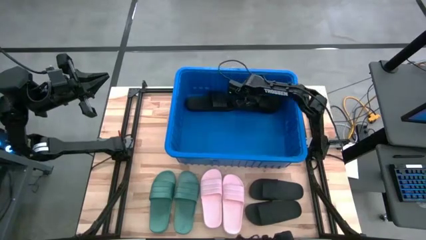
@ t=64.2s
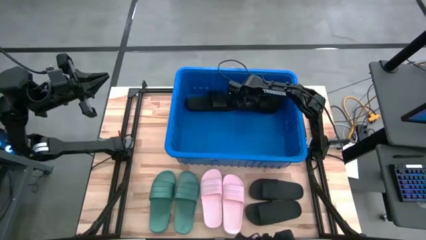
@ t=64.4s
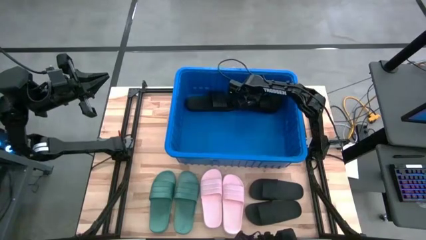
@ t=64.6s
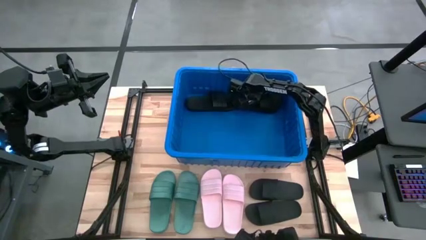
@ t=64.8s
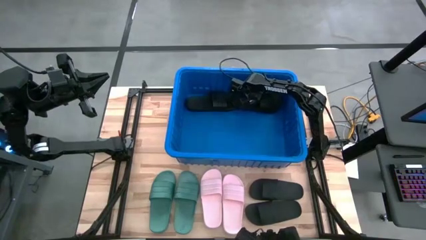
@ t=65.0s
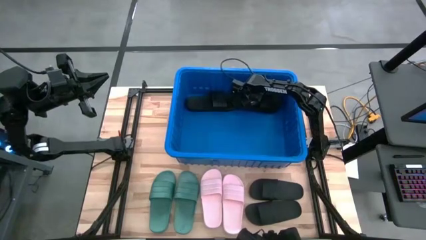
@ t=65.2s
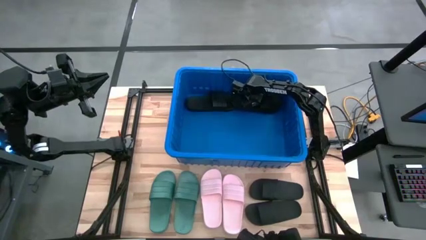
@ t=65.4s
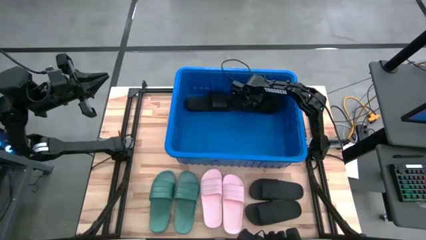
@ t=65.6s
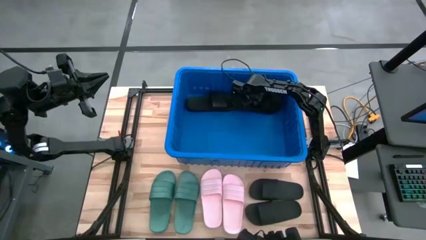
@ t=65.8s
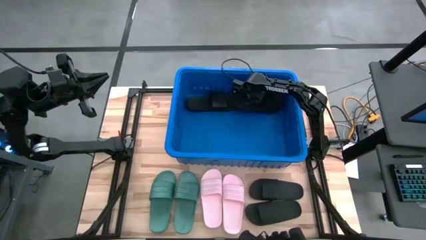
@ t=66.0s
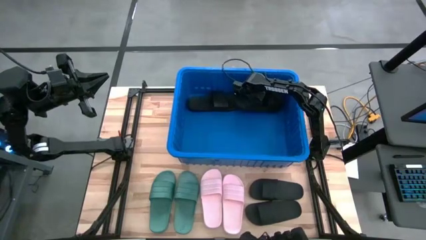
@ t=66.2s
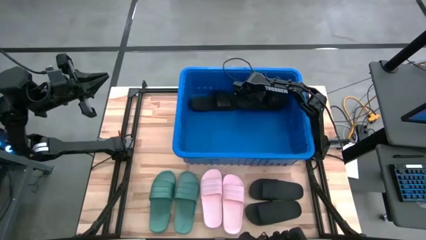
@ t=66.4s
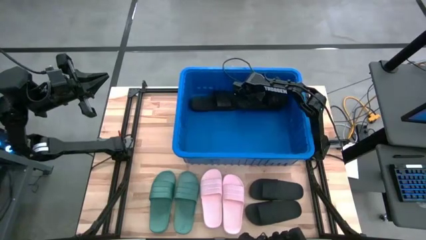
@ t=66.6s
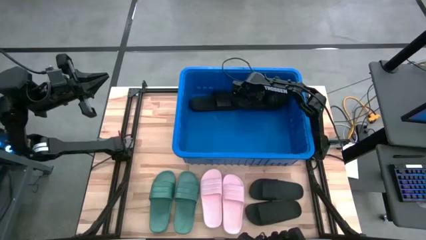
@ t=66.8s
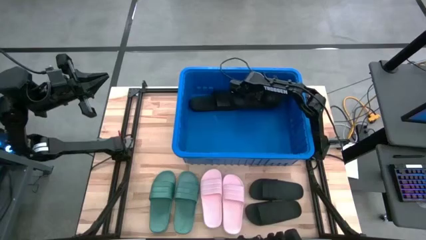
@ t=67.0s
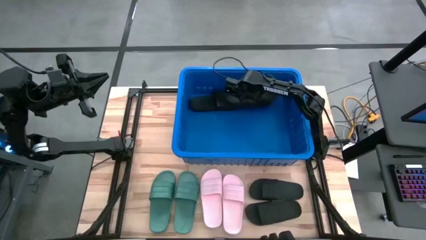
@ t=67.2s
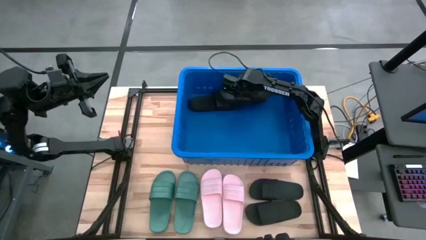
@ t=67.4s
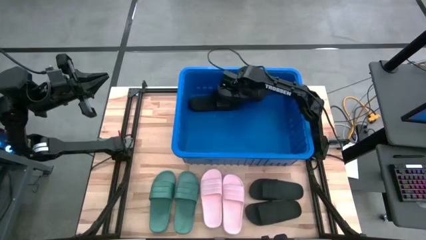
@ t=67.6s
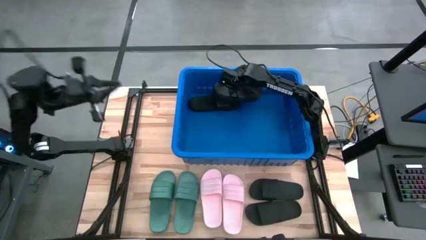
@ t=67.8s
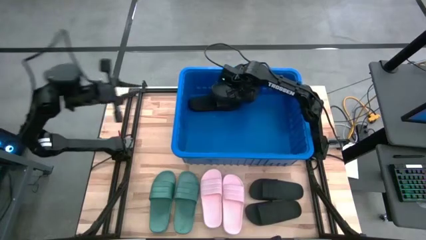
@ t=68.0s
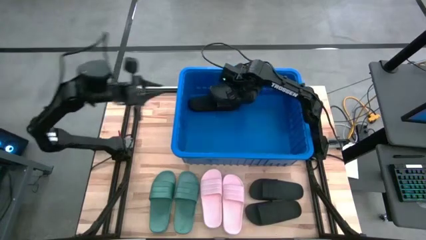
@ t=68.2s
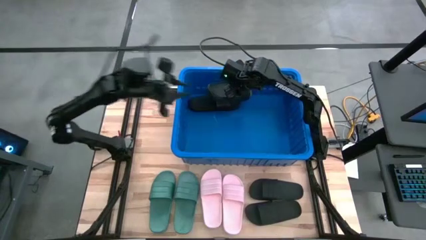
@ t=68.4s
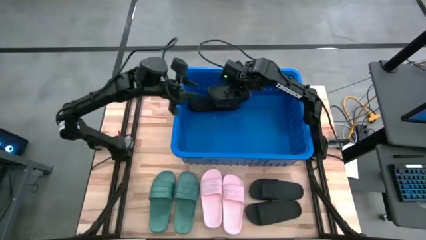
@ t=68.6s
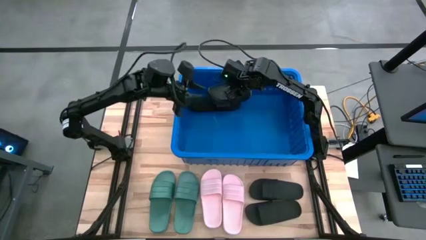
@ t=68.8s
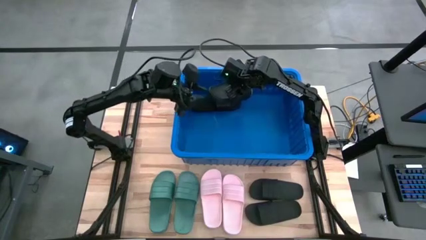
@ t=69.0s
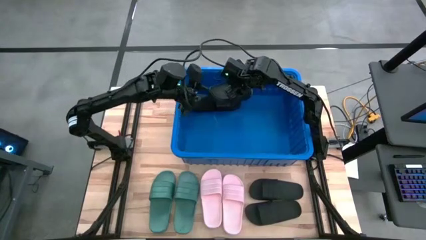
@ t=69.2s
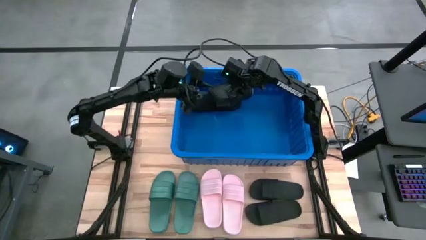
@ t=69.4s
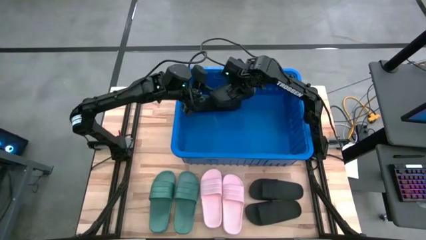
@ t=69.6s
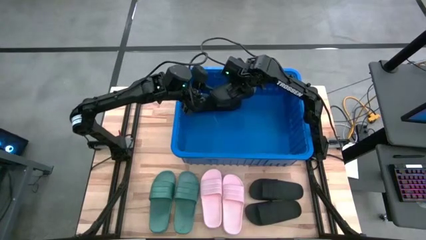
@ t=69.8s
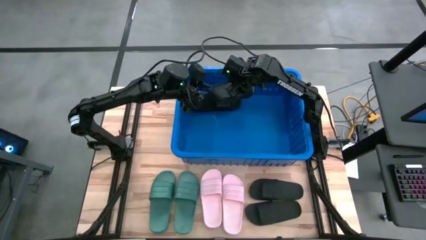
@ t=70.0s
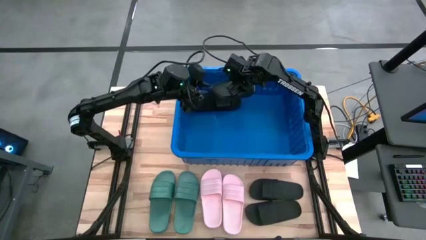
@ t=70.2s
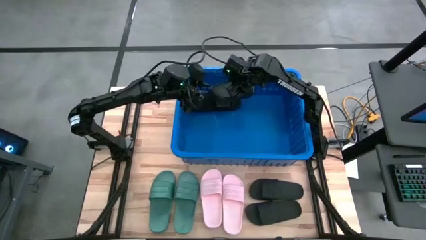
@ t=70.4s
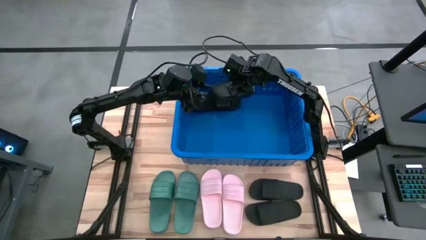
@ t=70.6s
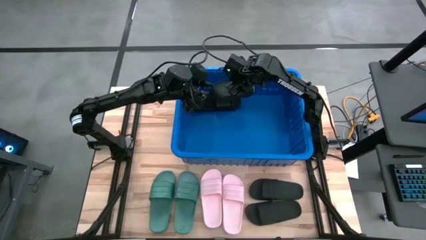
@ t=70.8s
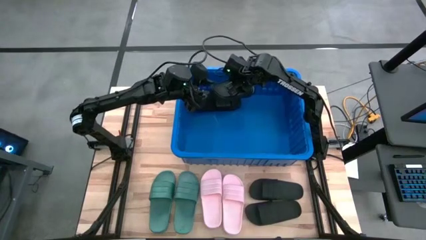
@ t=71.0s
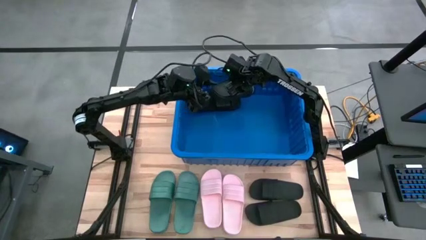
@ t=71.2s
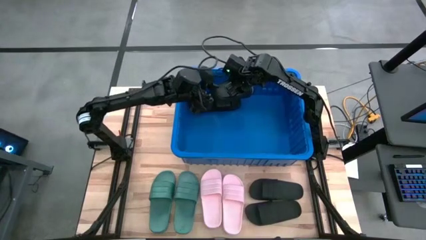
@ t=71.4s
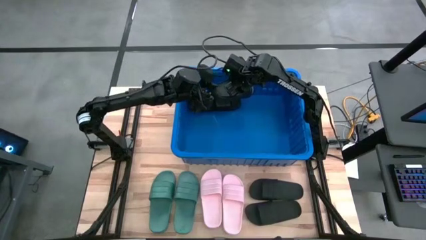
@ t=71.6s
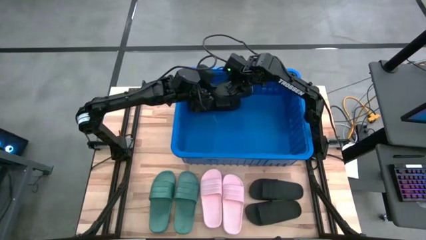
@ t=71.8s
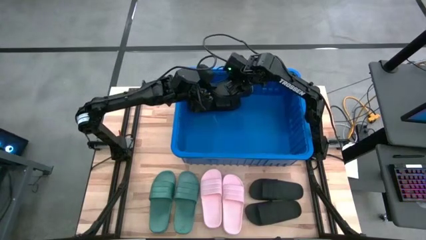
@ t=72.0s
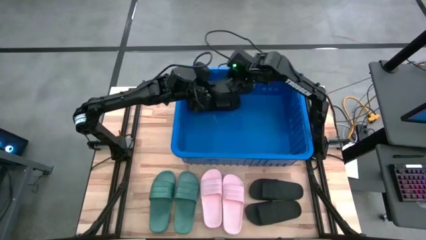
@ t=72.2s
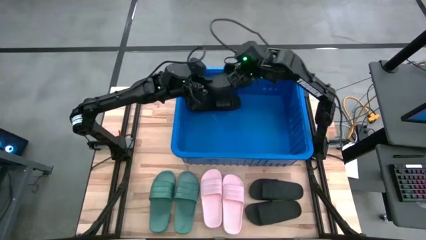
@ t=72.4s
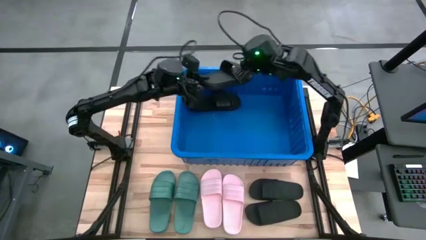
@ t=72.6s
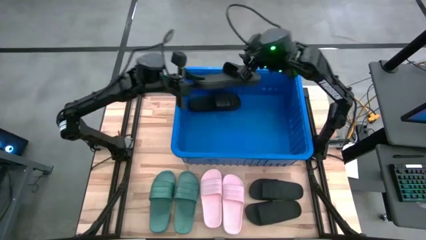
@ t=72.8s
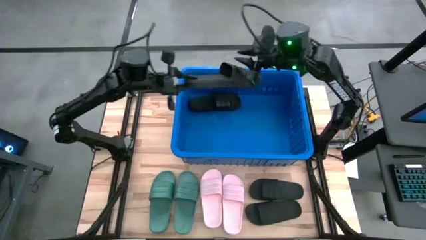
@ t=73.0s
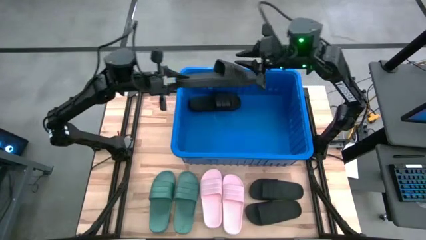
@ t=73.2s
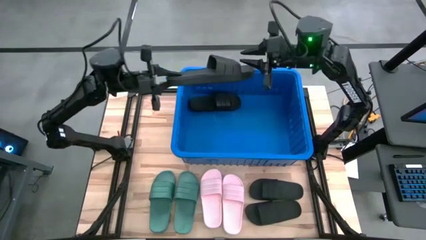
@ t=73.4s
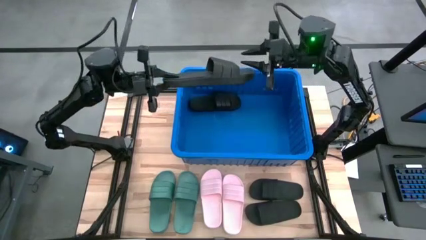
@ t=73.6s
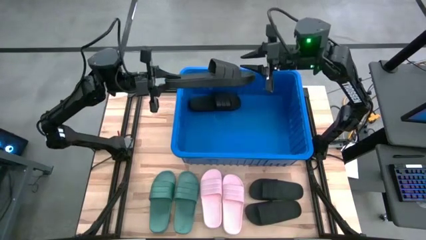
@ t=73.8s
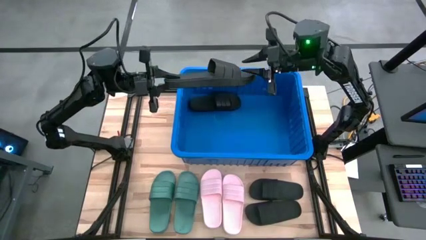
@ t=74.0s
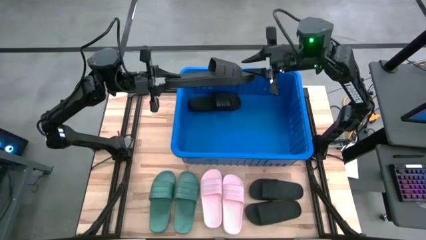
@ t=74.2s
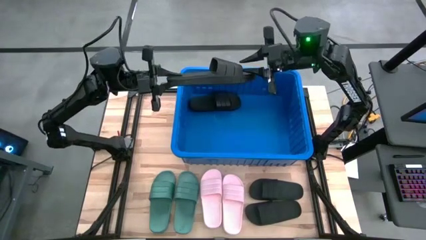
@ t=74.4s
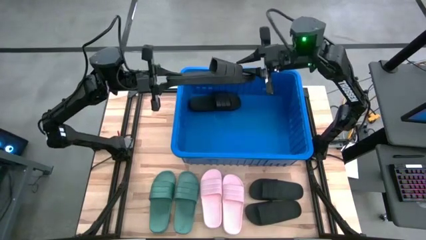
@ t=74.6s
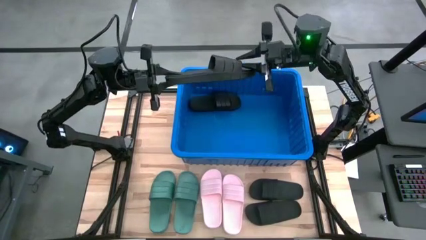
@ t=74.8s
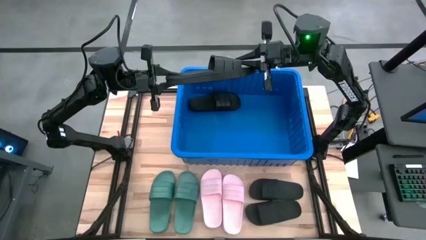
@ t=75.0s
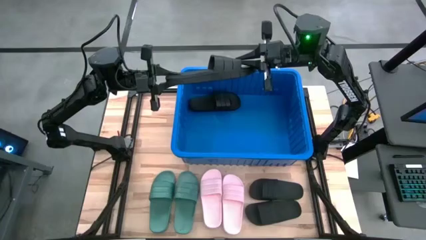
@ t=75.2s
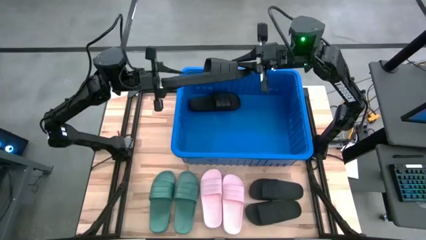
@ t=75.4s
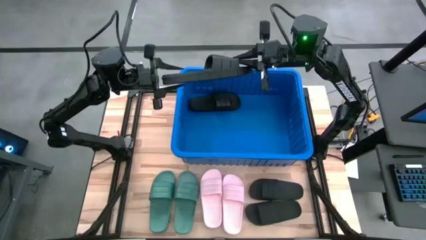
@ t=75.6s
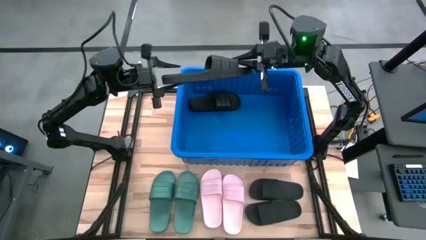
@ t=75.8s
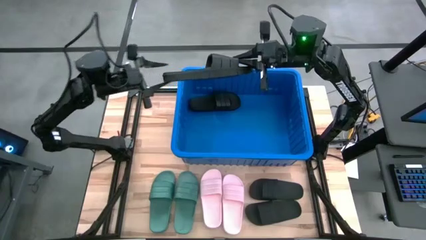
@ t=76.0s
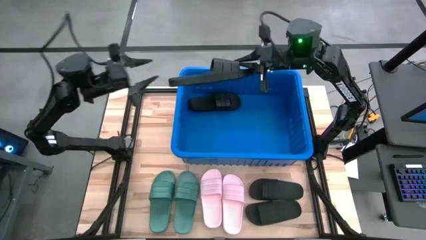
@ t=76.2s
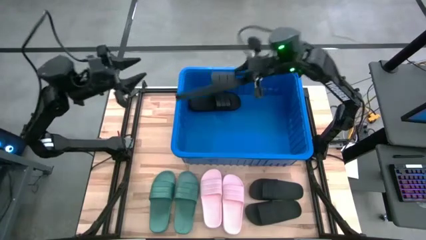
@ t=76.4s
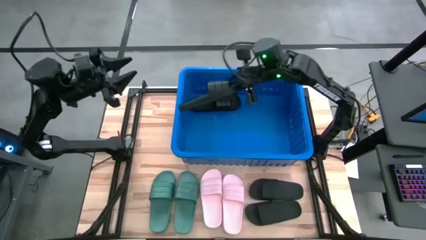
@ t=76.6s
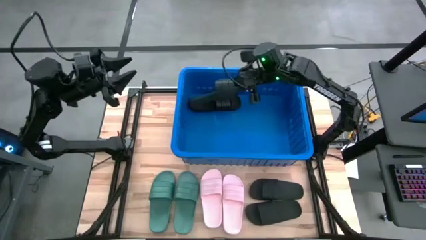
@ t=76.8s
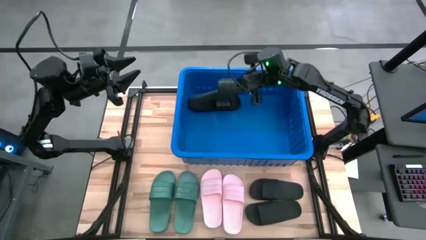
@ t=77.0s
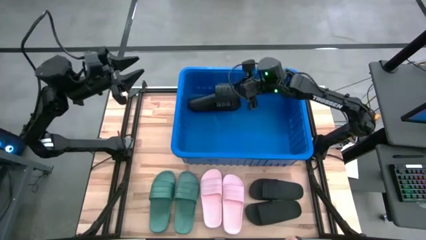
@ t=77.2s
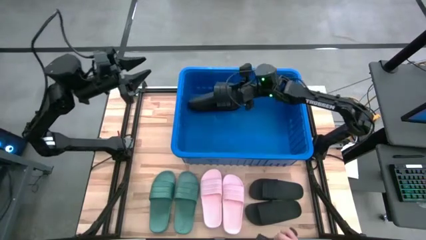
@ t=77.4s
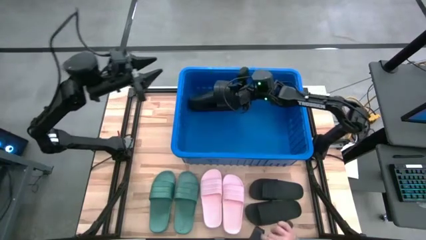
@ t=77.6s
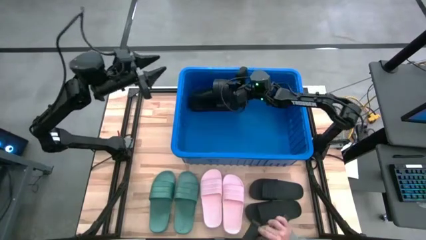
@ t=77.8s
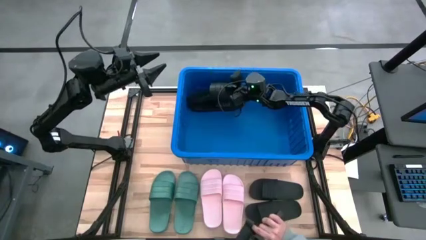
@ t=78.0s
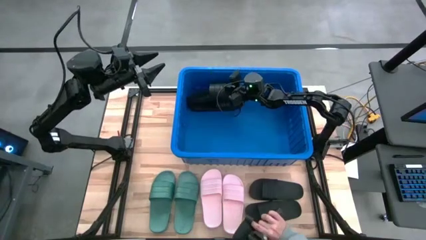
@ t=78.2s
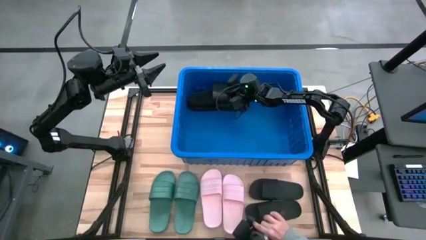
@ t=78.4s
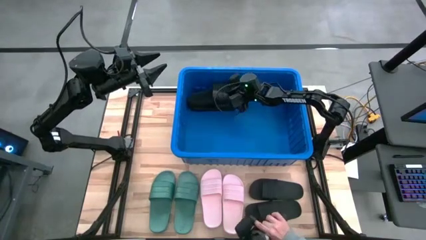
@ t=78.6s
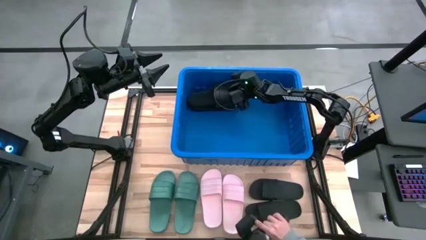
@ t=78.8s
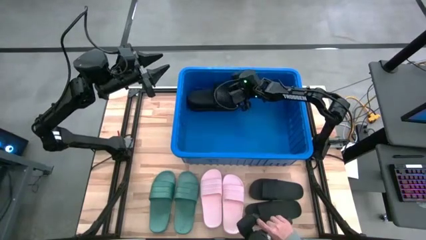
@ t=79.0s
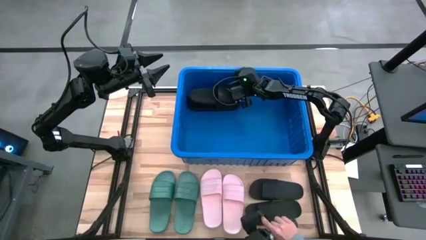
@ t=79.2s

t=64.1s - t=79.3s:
Task: Pick and place slides into bin
Stack the black slipper on top of the black slipper in the blue bin
